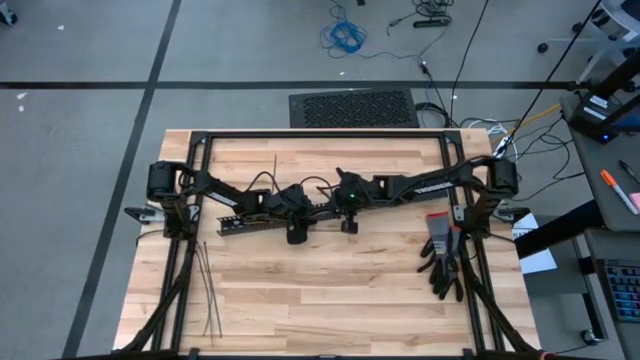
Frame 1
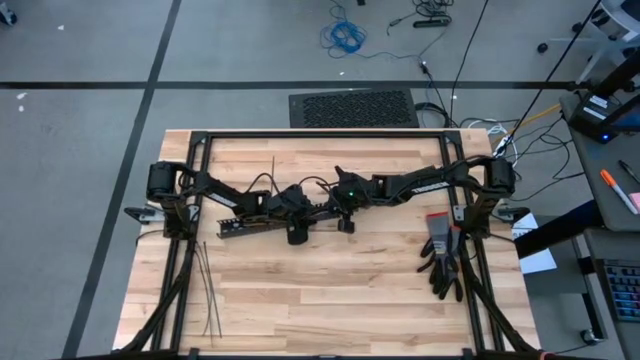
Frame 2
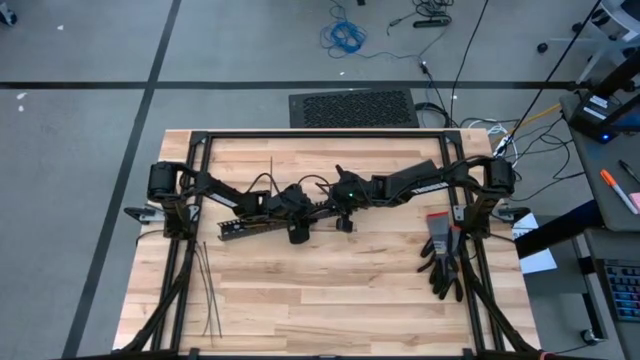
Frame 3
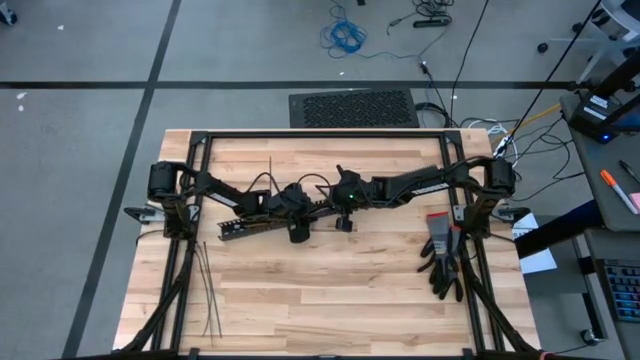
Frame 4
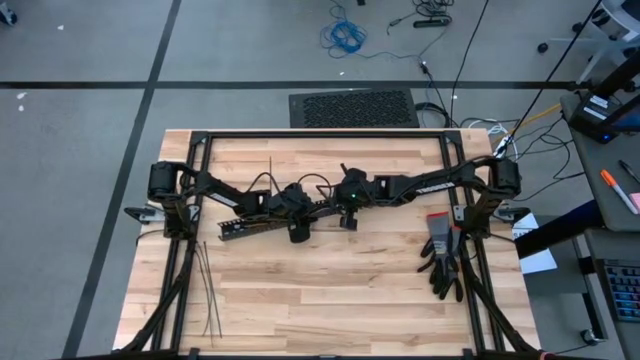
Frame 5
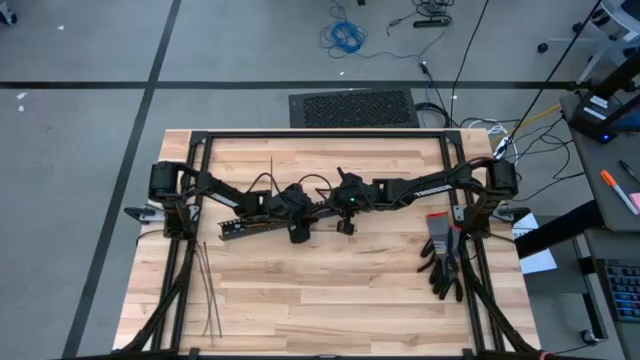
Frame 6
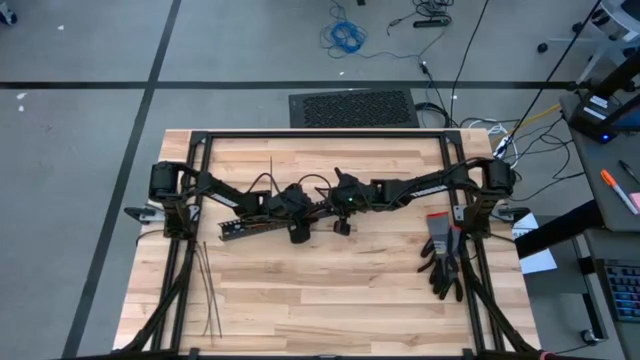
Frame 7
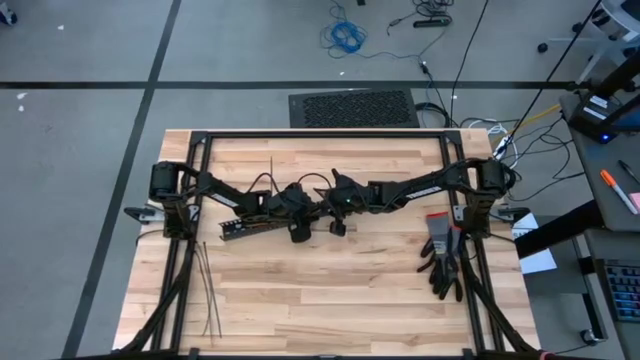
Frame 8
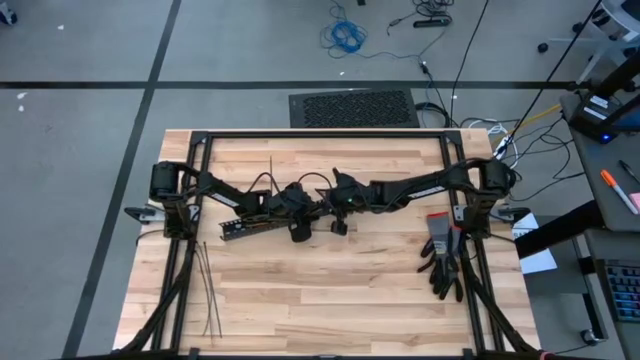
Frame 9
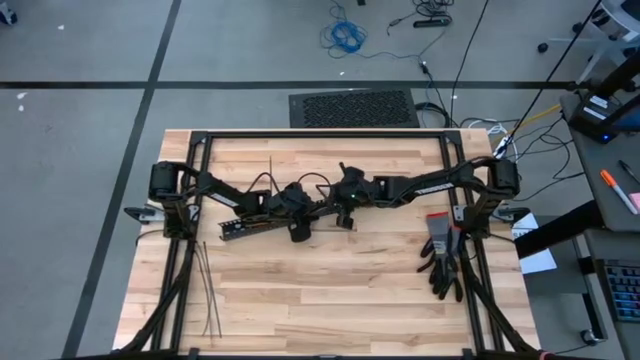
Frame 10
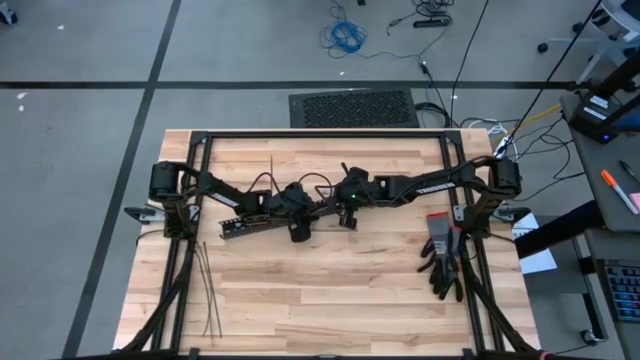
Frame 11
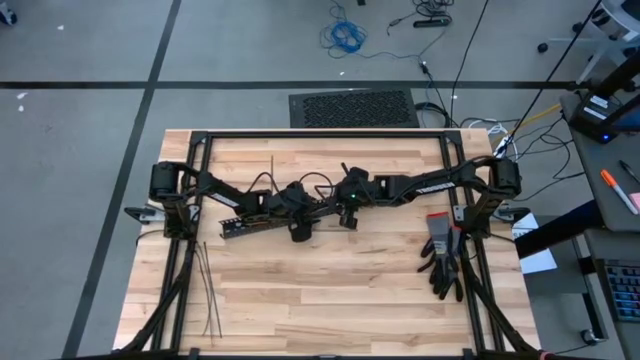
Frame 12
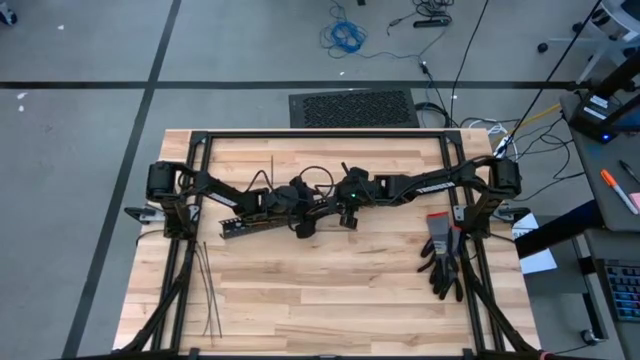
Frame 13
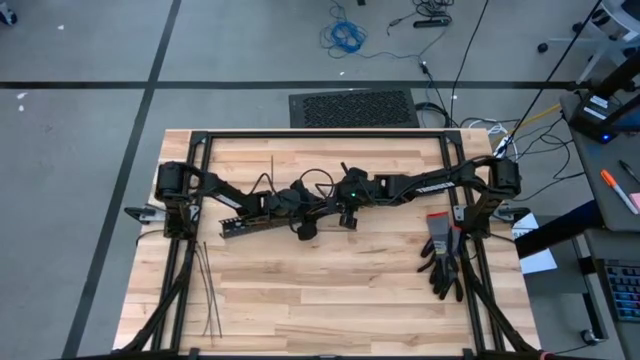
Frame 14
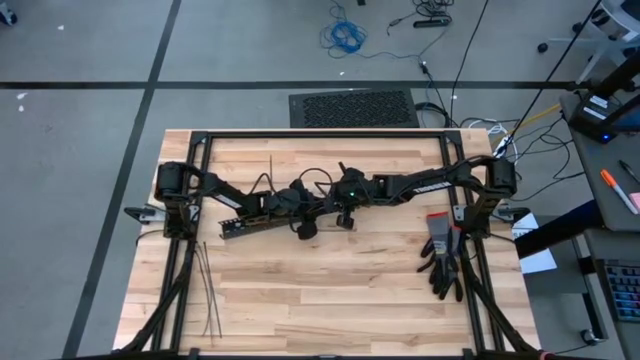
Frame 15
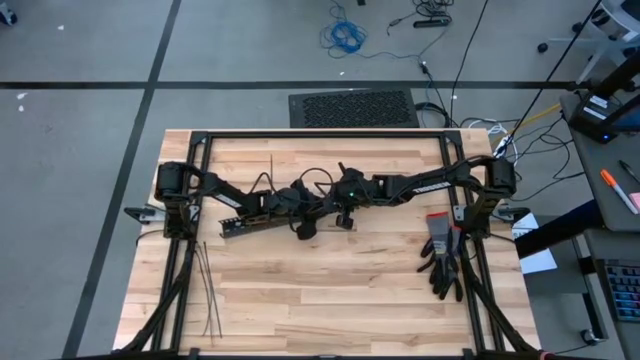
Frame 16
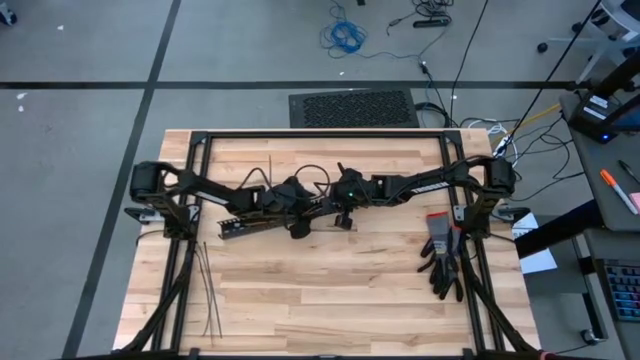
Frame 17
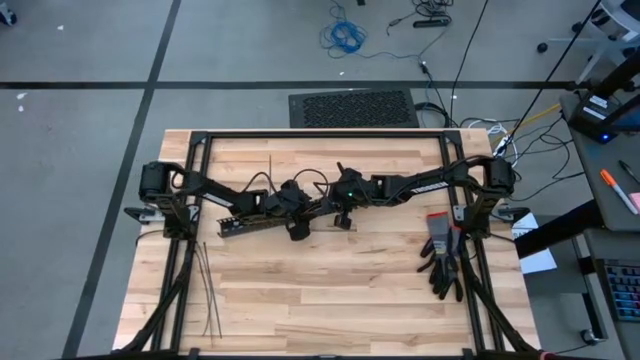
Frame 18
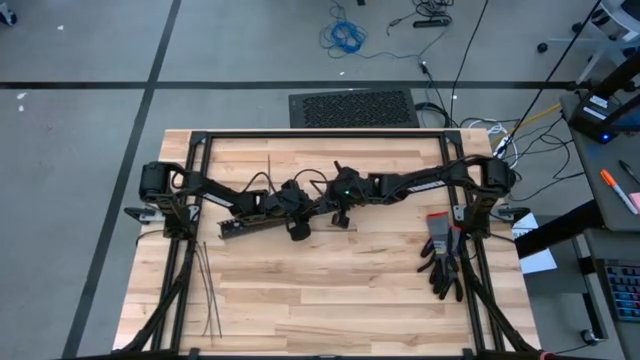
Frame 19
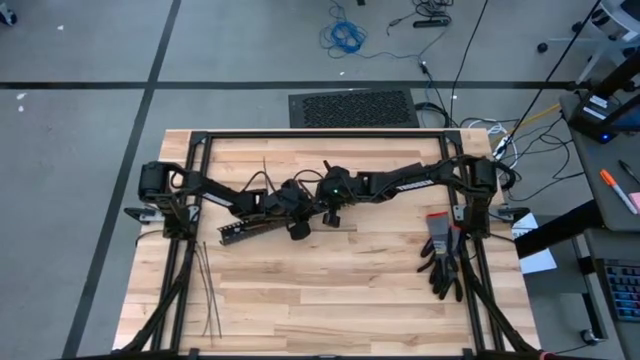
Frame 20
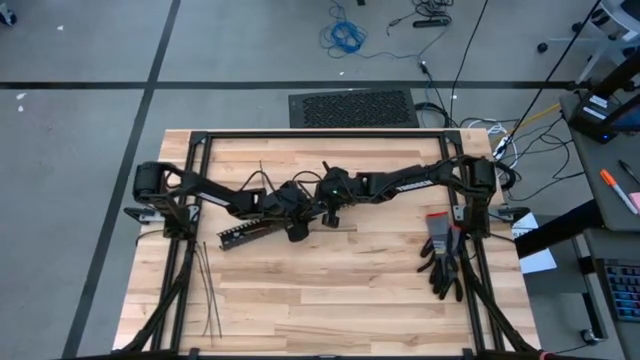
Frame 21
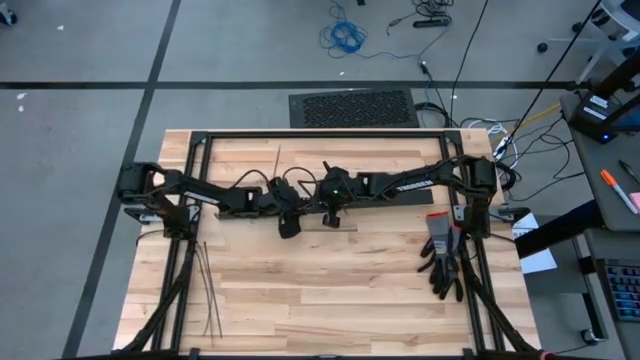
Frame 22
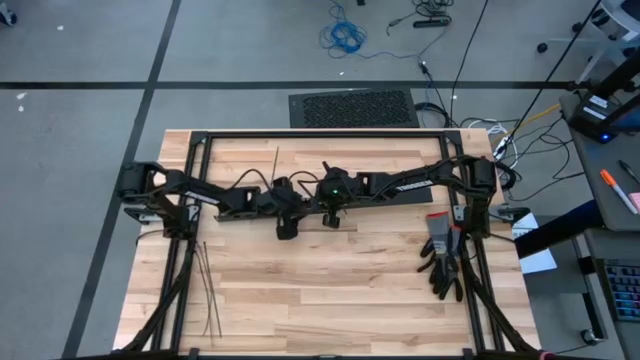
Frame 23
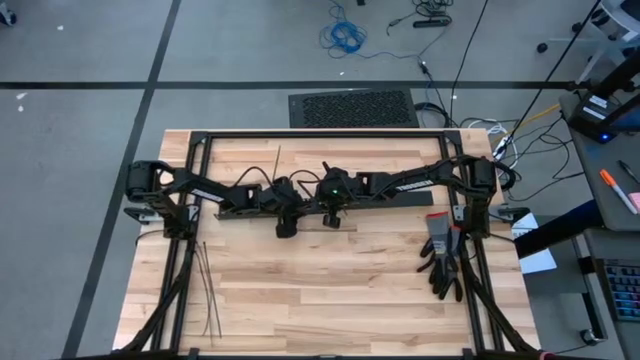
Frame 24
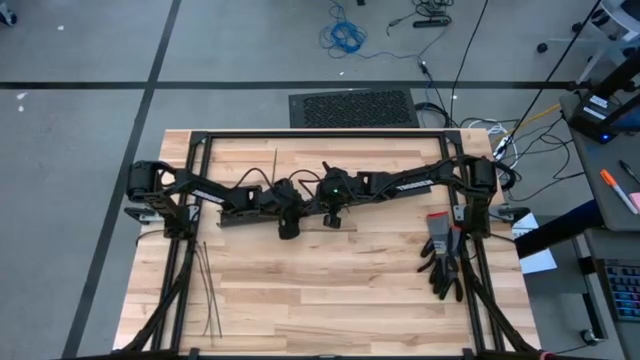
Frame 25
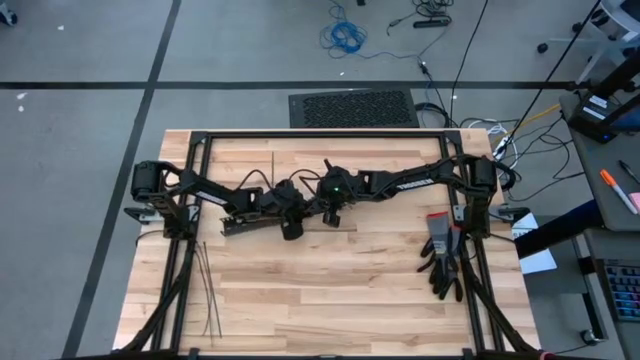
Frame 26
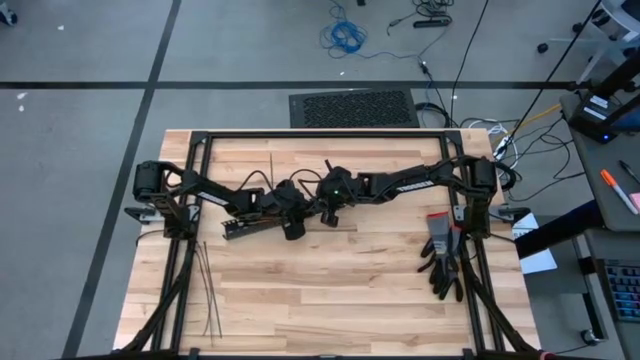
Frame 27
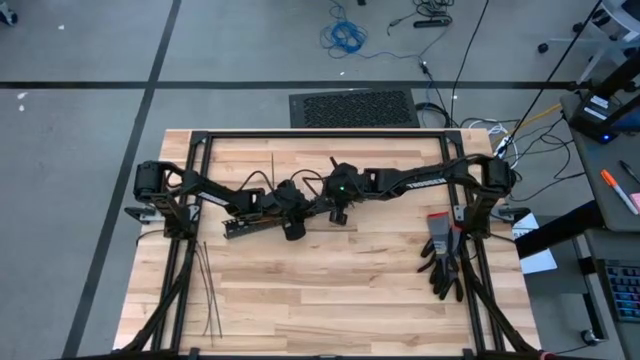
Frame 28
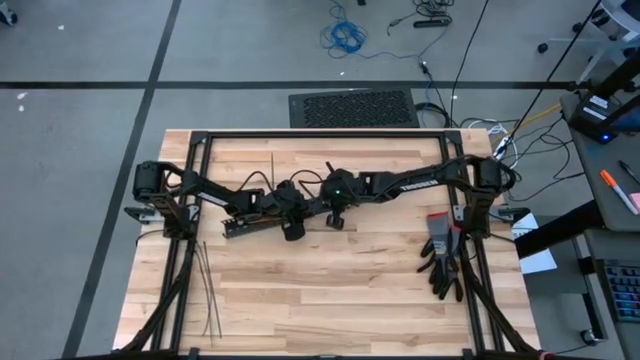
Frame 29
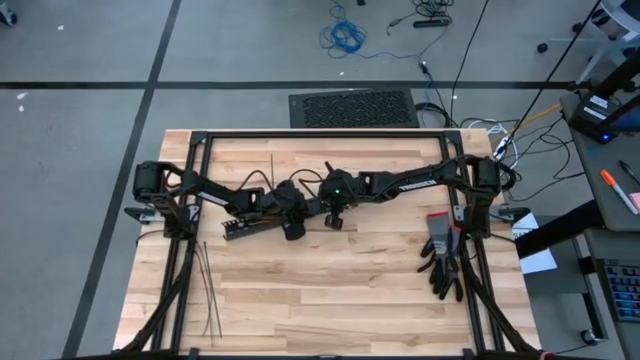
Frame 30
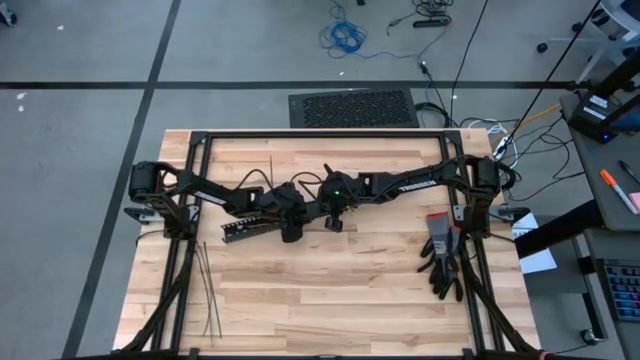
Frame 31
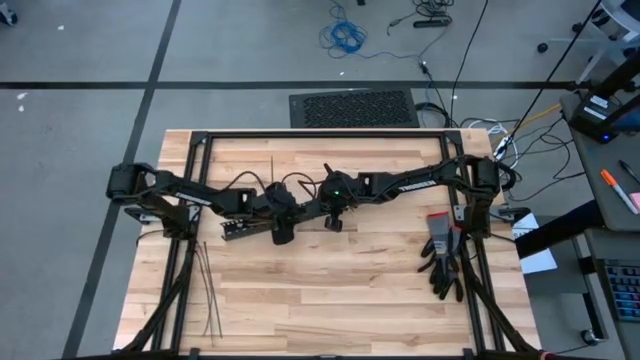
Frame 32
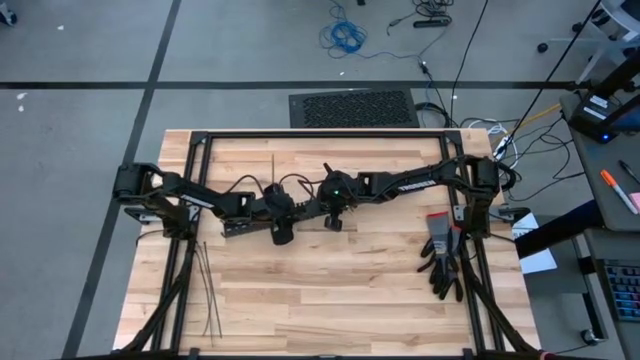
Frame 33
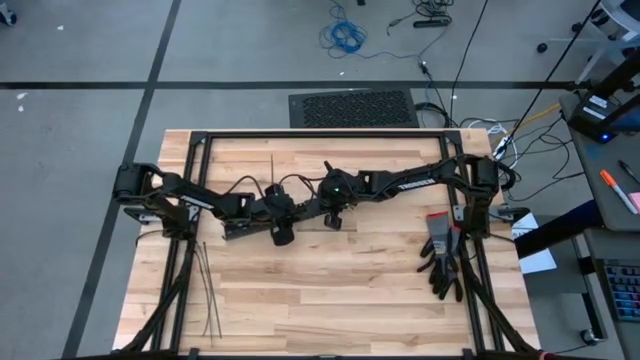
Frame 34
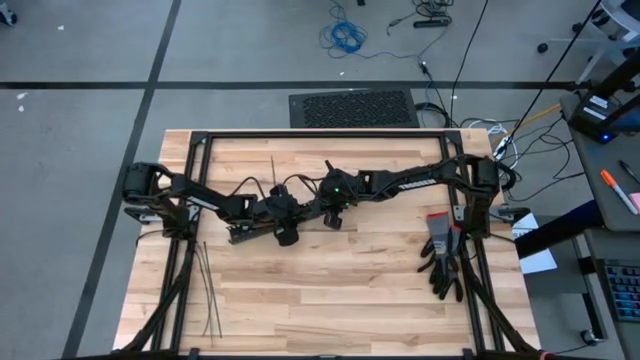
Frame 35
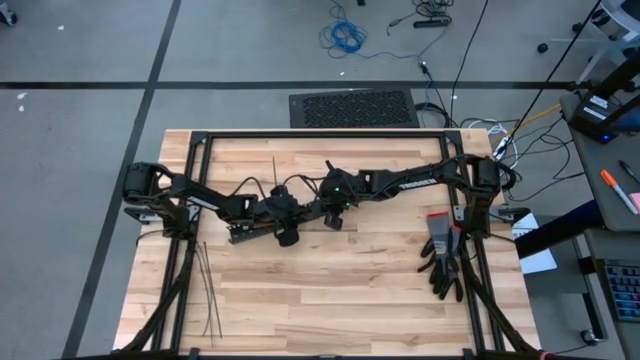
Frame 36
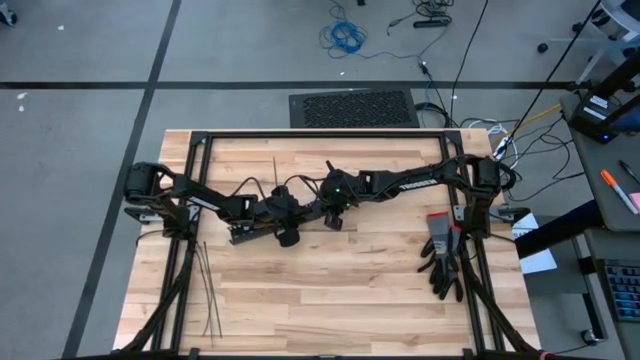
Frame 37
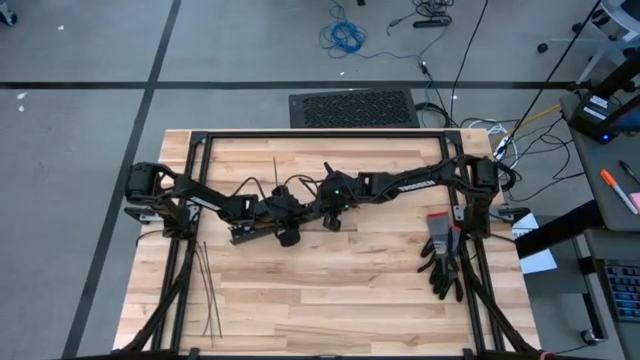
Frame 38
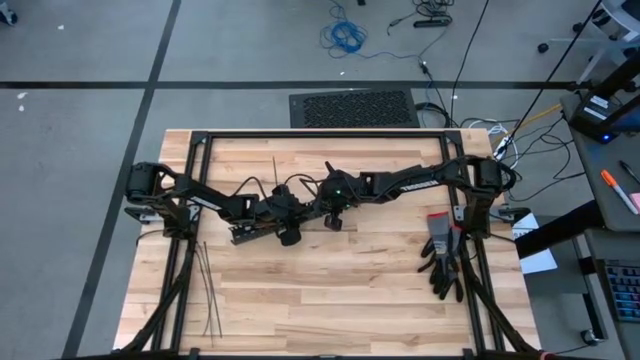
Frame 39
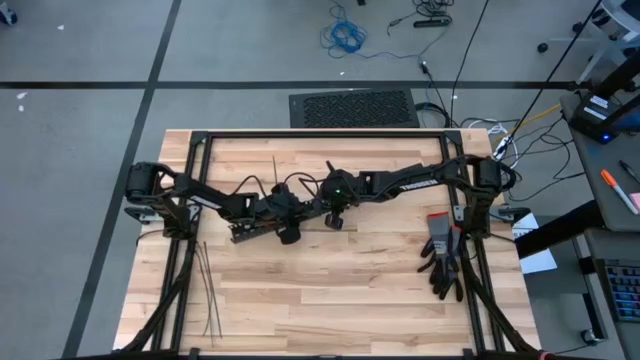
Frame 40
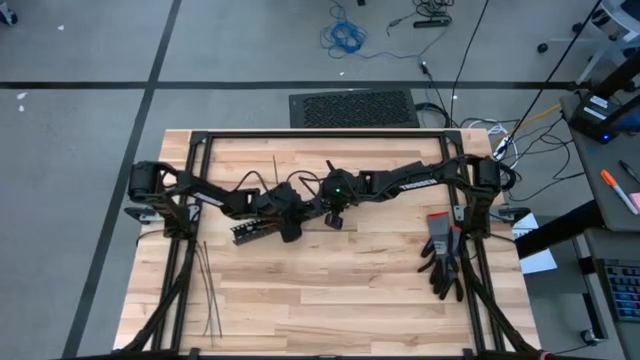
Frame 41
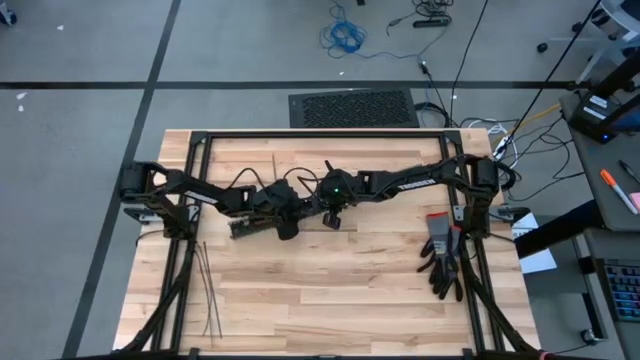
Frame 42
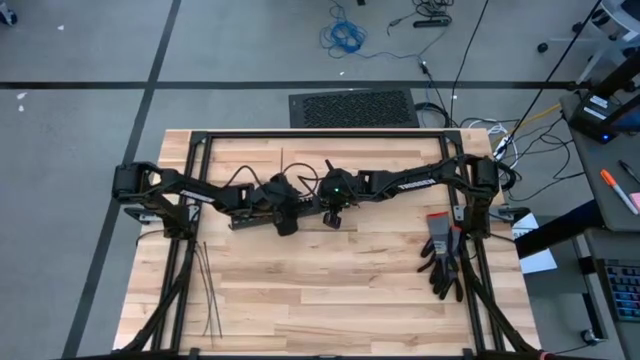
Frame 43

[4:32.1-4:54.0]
Task: Ziptie cables
Close the black cable duct
